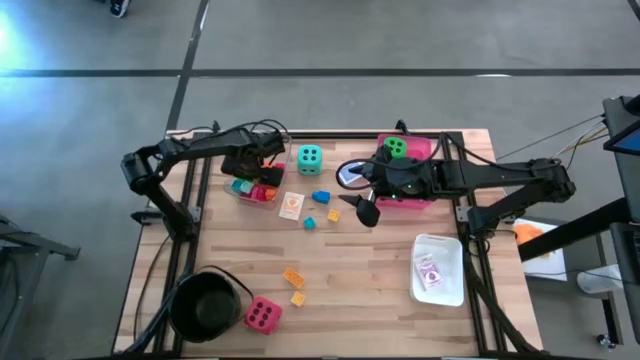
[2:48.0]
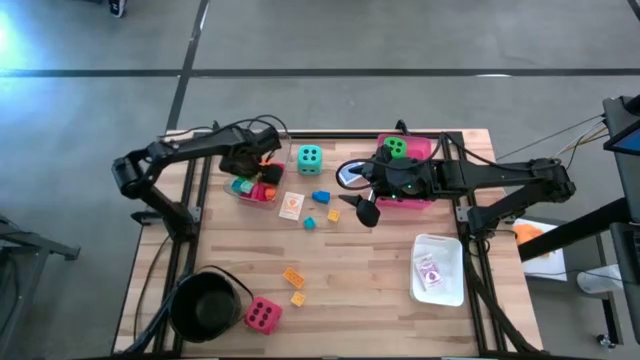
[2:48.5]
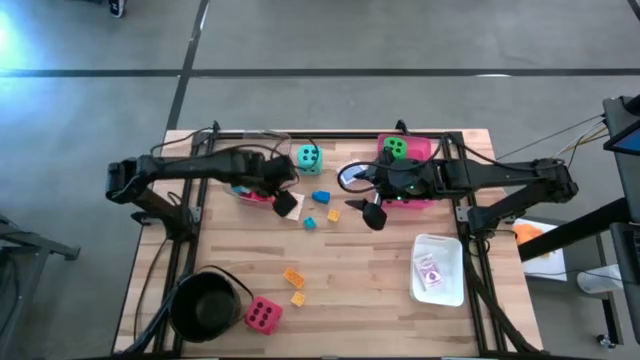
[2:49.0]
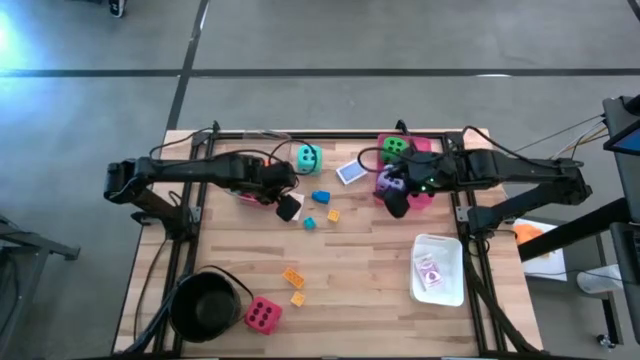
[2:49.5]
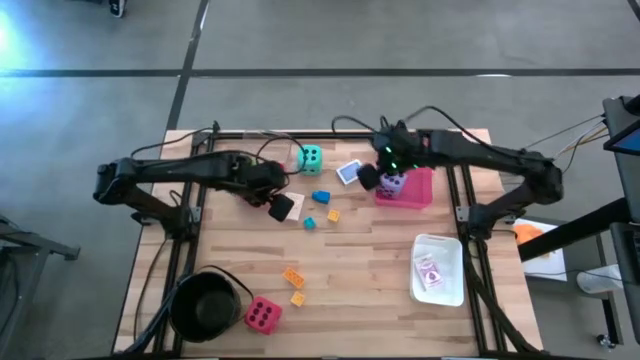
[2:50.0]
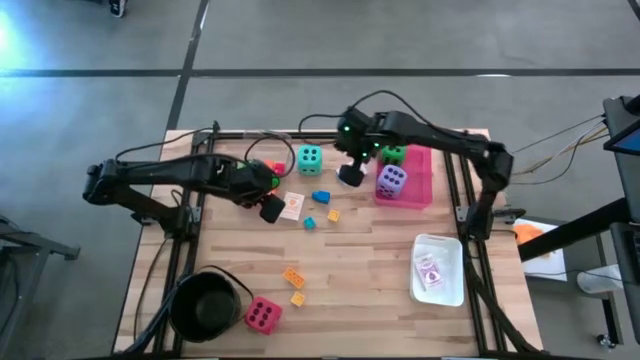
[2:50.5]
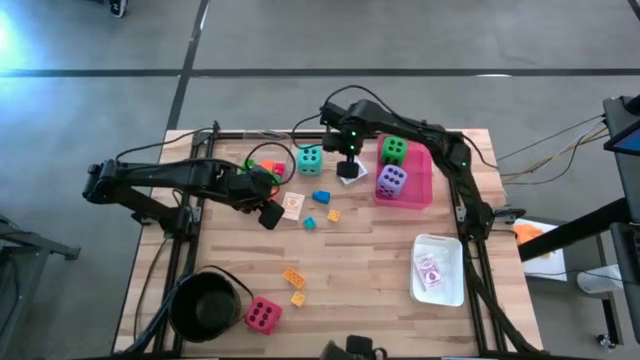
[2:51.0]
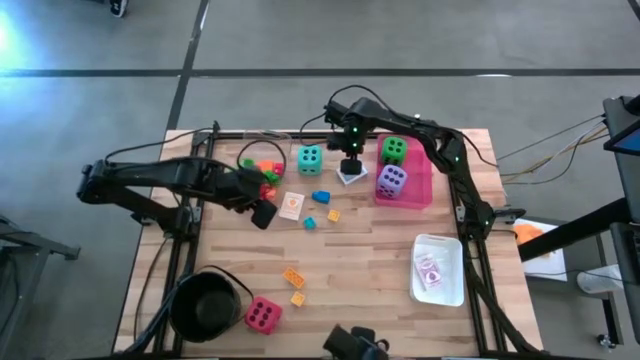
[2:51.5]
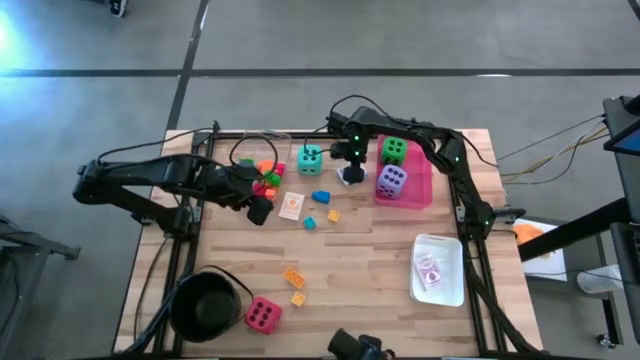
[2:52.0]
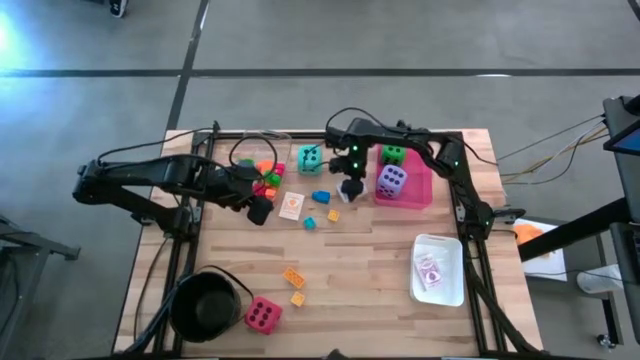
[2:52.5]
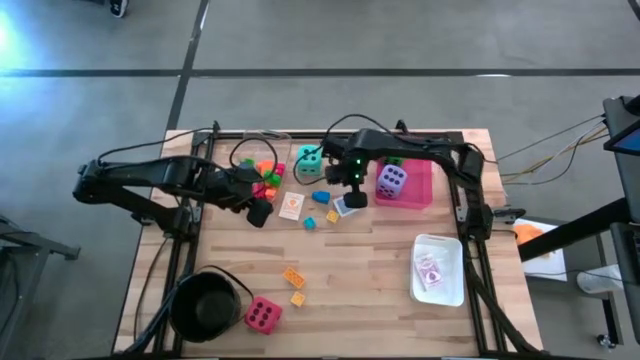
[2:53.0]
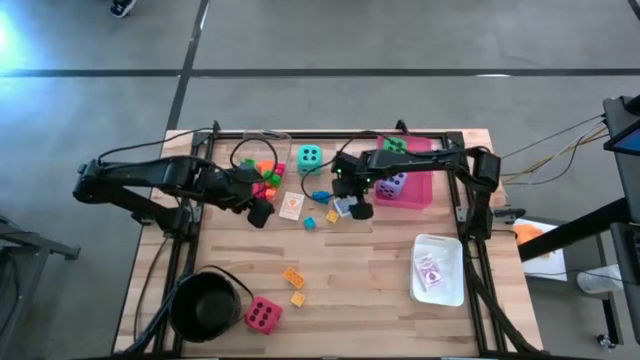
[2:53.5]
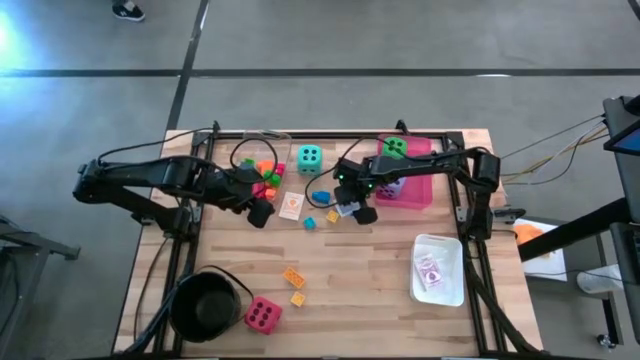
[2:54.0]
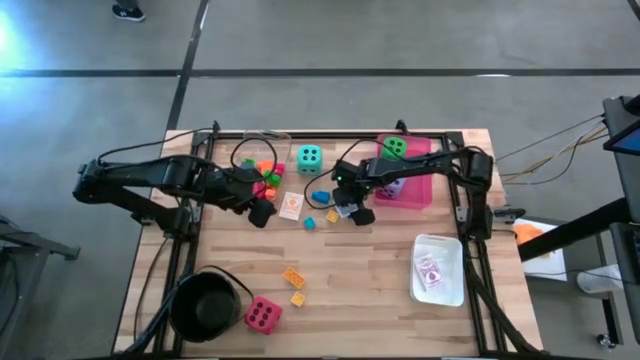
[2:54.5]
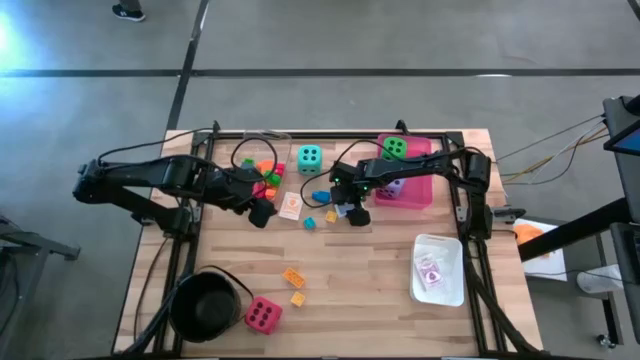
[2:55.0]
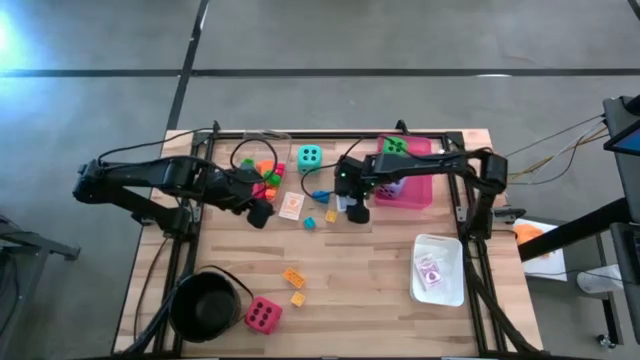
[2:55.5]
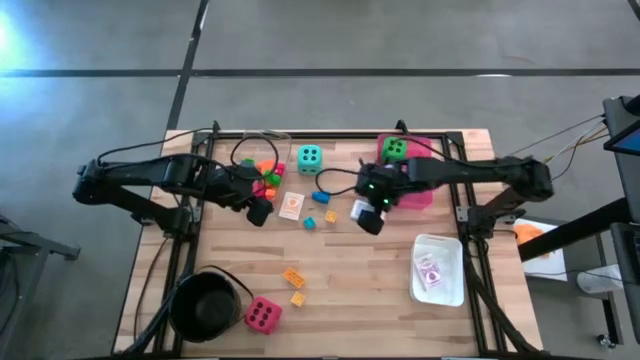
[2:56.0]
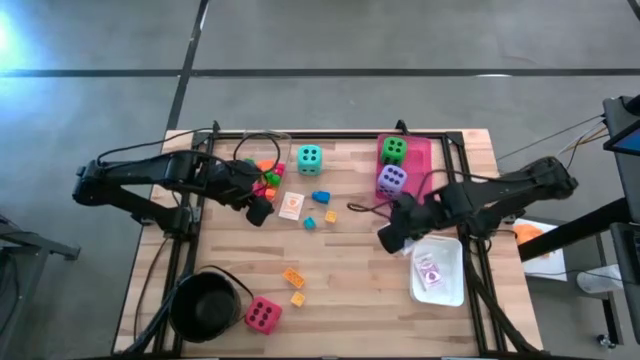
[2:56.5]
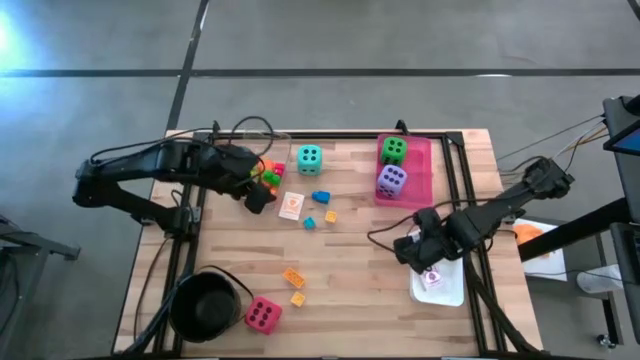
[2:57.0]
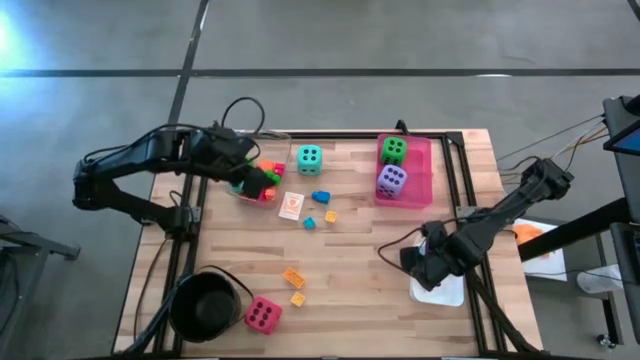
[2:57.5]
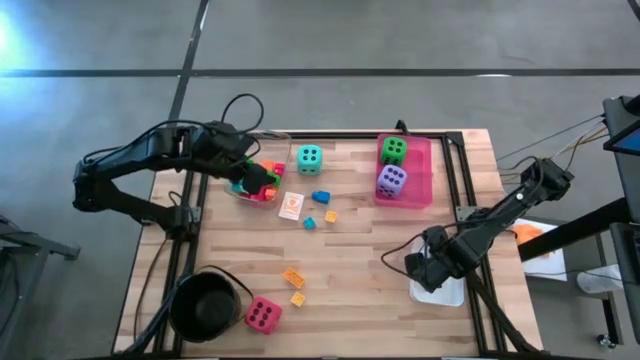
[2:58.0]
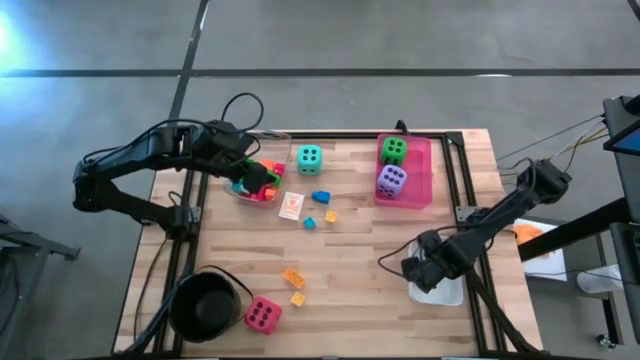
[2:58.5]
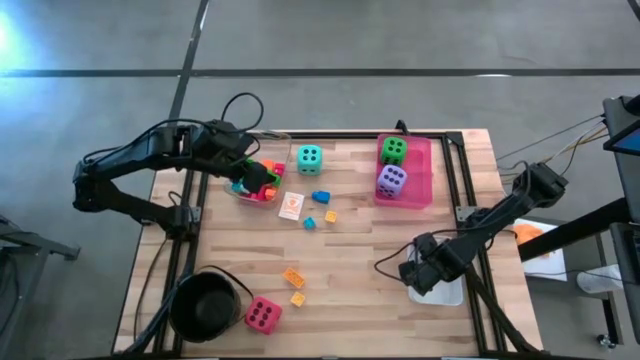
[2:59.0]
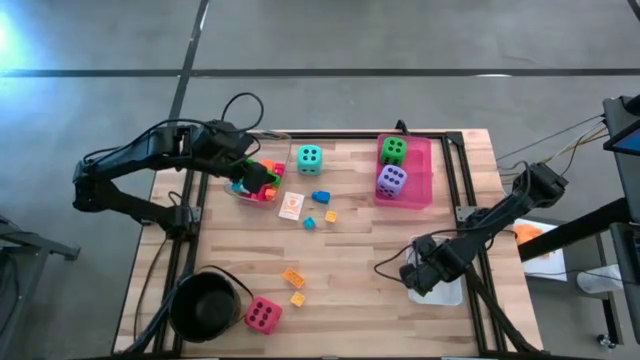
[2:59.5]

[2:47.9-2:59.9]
Task: Pick & Place Toys
Put the blue deck of cards into the white bin

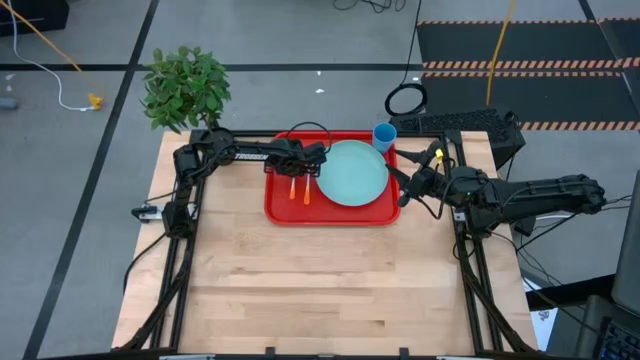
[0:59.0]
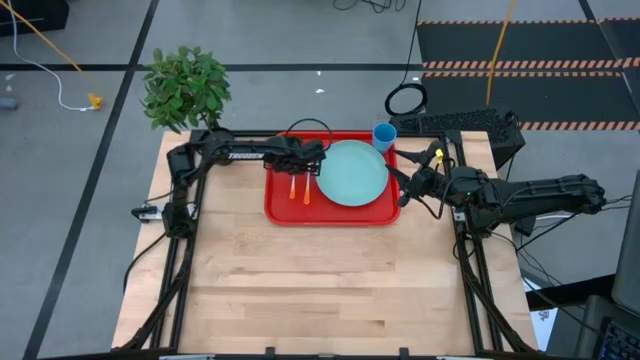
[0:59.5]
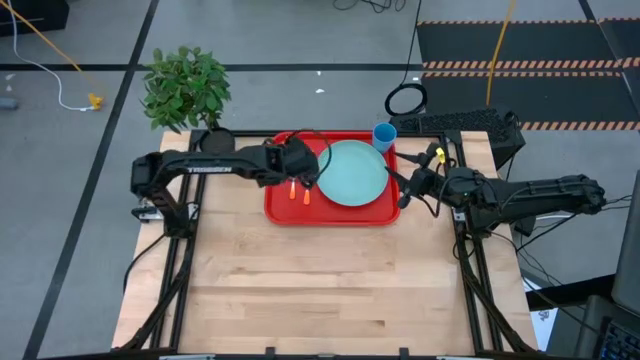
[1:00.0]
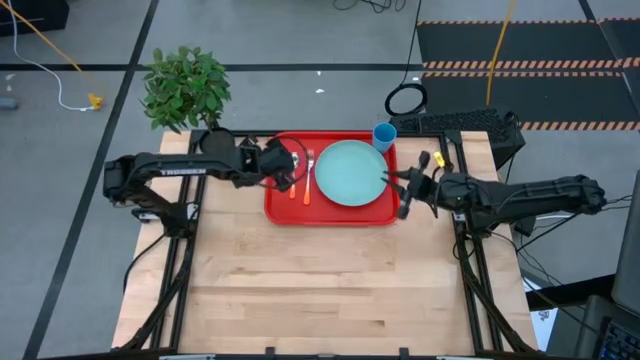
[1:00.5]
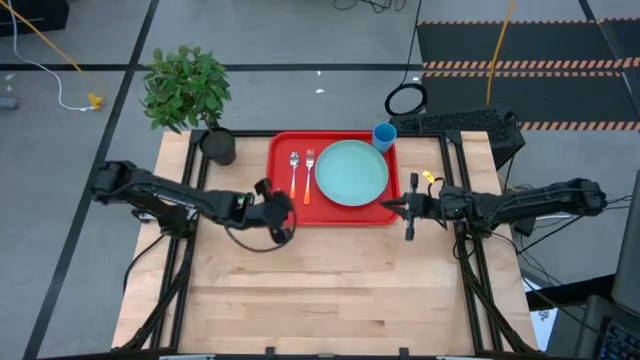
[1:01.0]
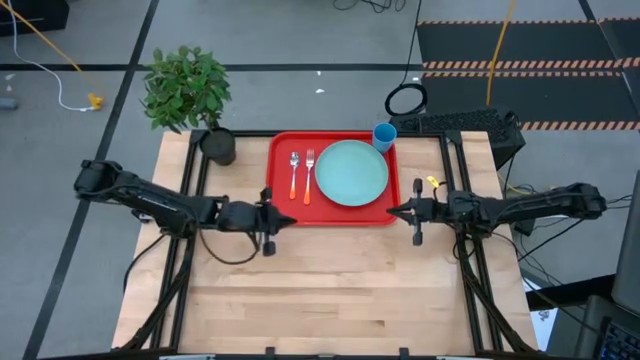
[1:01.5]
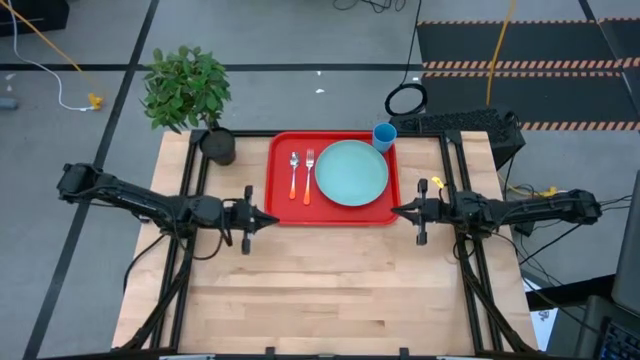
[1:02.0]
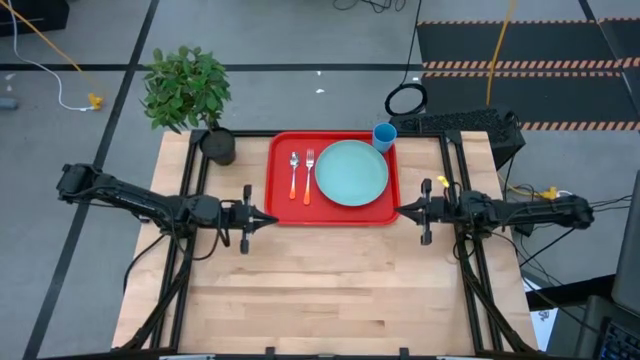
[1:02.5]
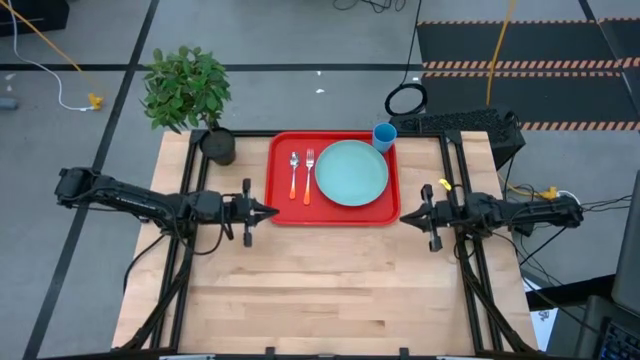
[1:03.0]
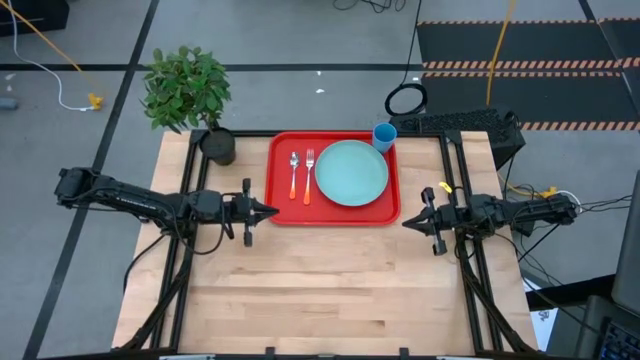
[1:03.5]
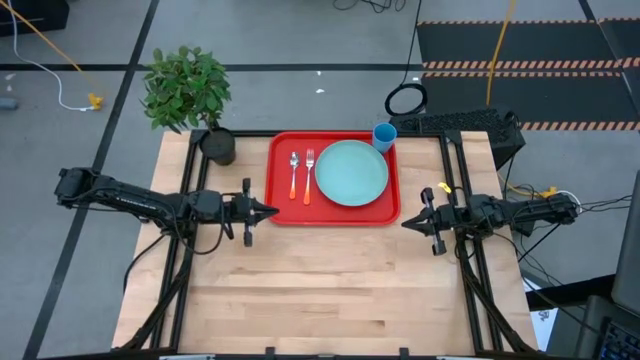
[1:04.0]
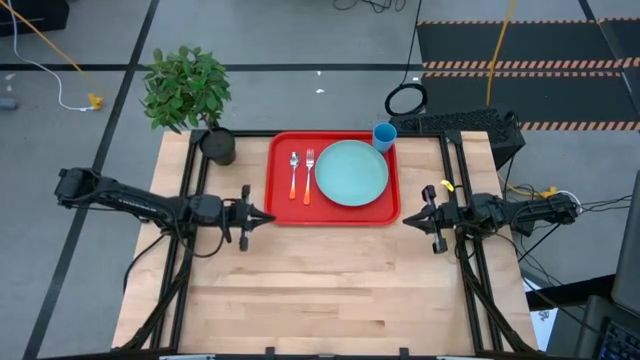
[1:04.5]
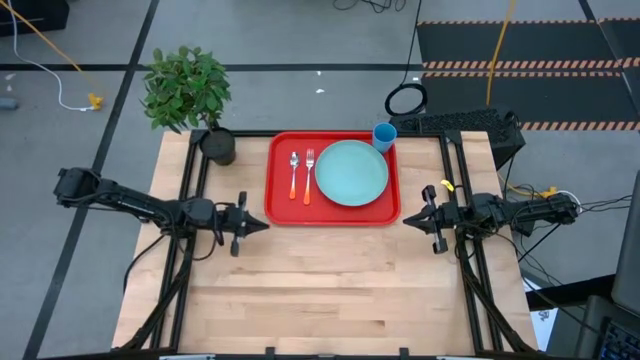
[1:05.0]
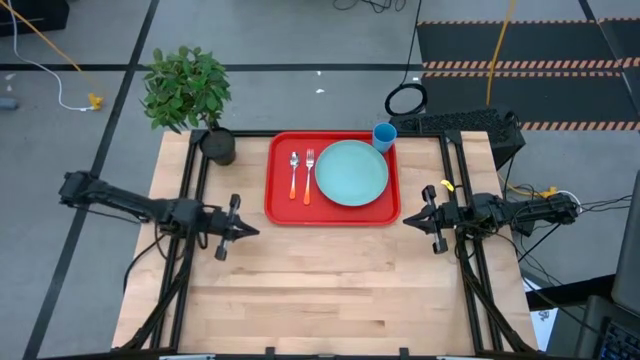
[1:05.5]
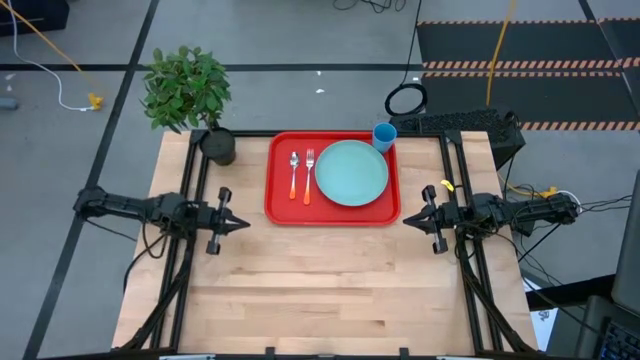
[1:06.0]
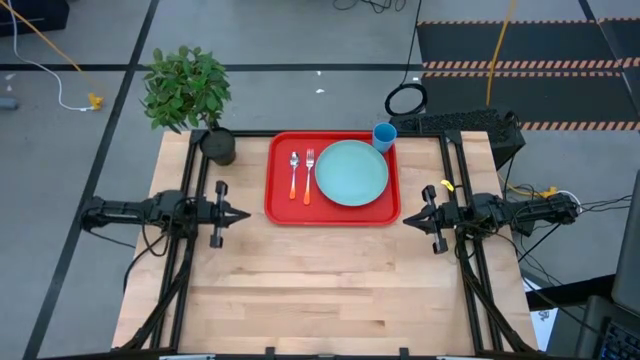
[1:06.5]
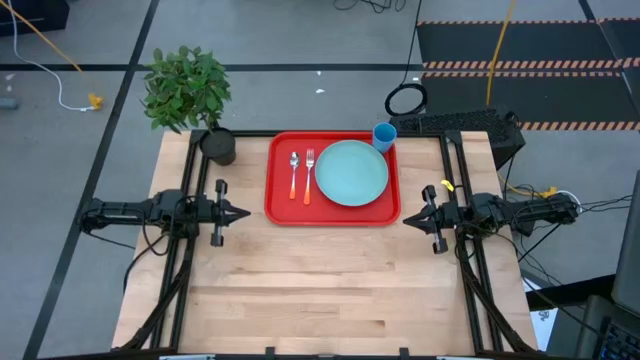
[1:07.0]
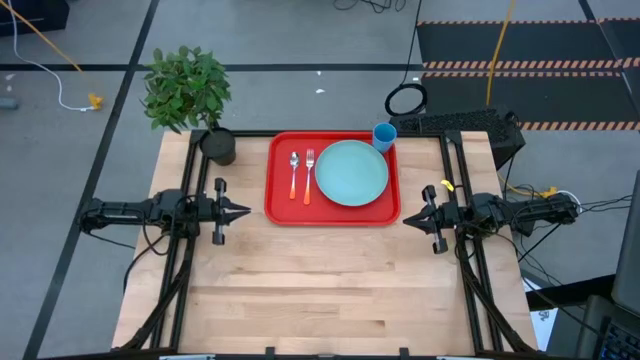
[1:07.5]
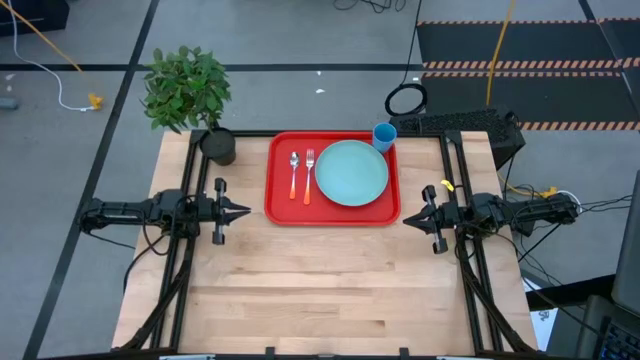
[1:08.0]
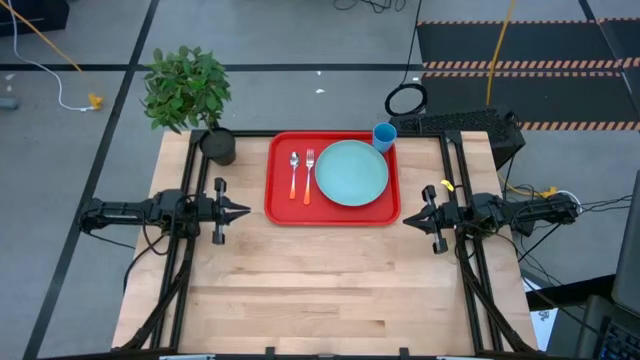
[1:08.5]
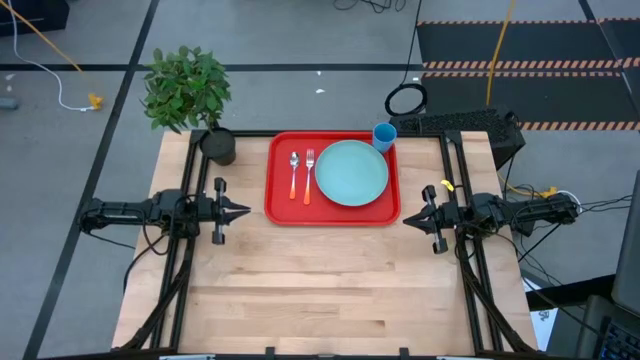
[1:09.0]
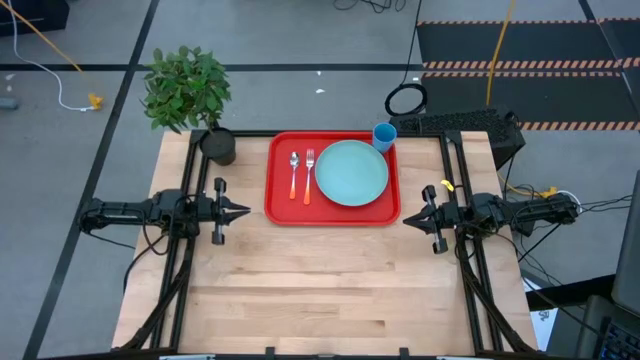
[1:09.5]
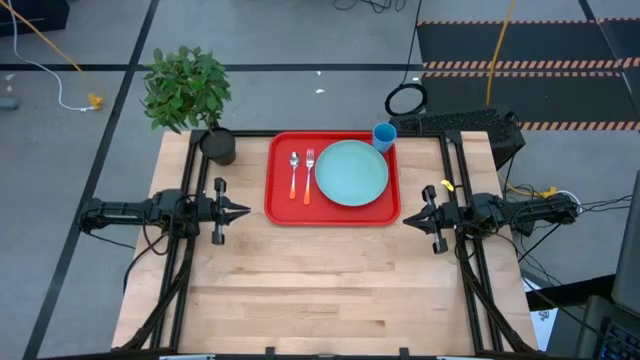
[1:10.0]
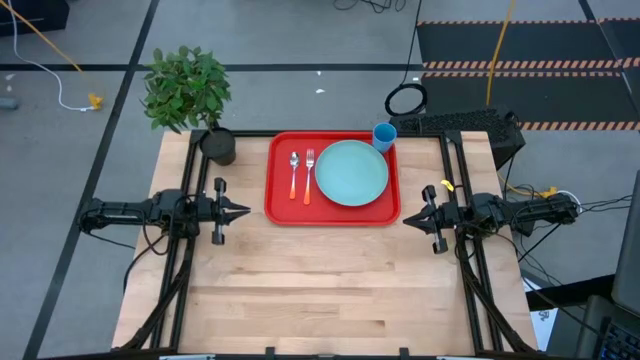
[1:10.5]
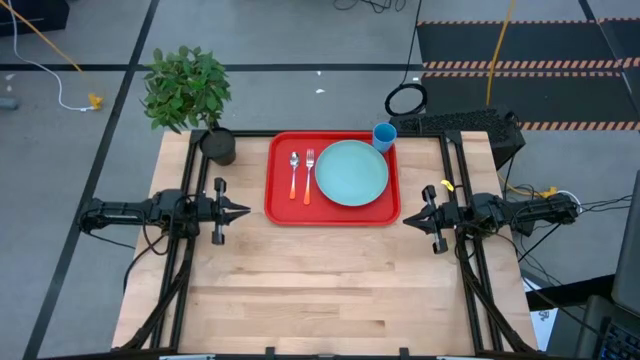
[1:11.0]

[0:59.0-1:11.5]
Task: Pick and place plate/cup/fork/spoon on tray
Return to Home Position
